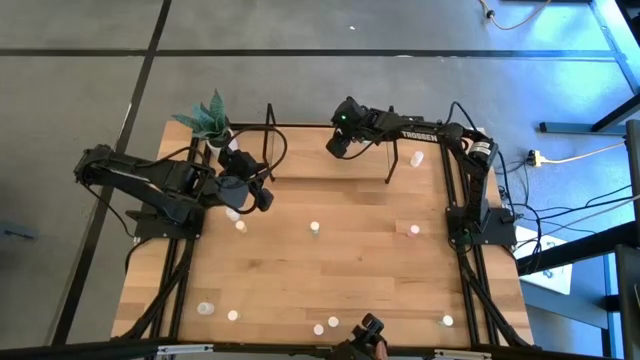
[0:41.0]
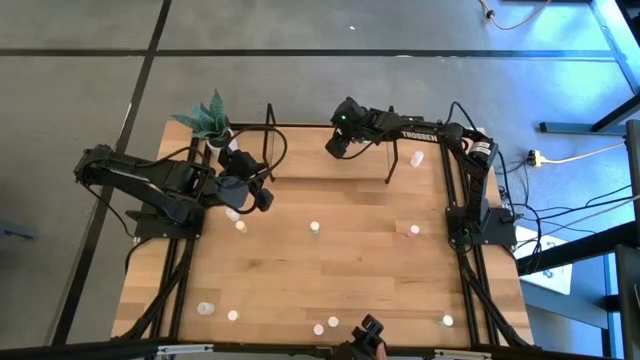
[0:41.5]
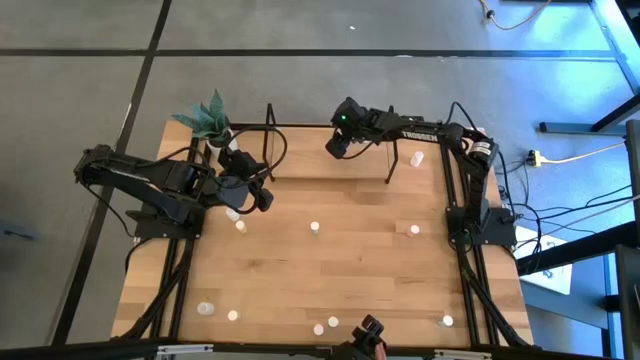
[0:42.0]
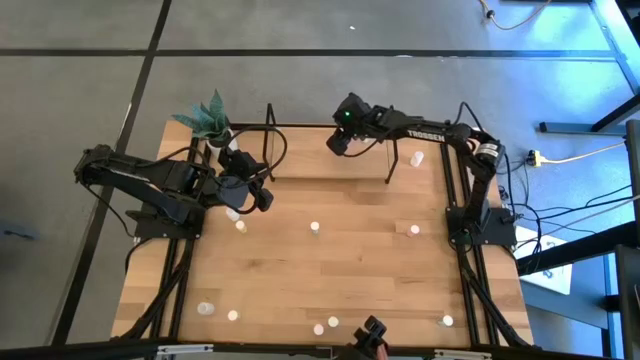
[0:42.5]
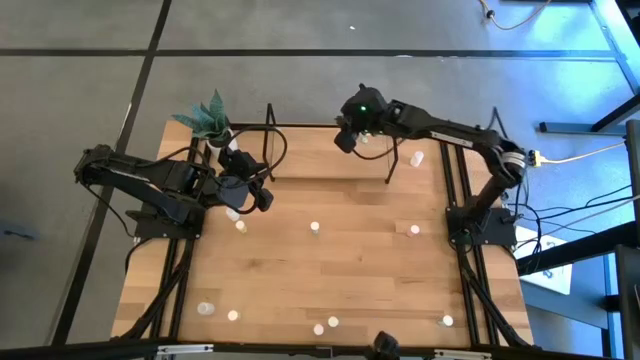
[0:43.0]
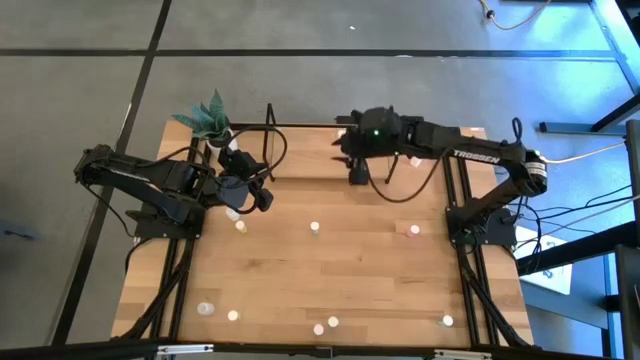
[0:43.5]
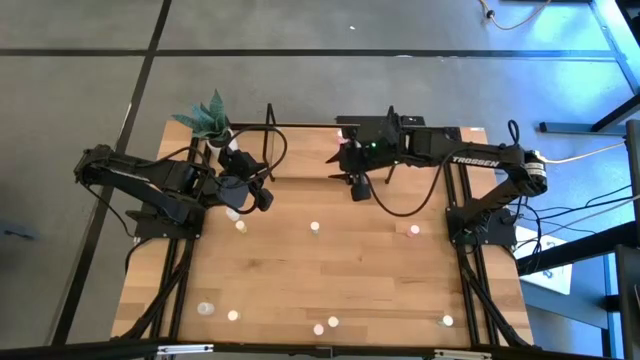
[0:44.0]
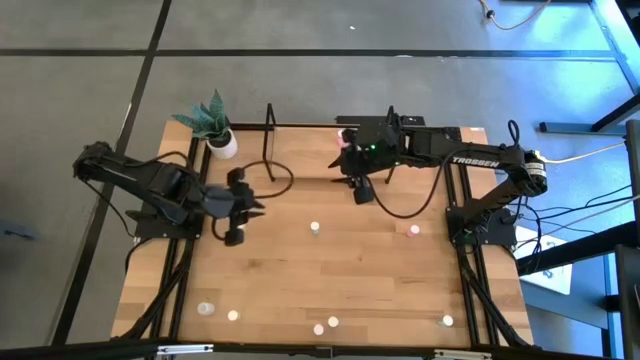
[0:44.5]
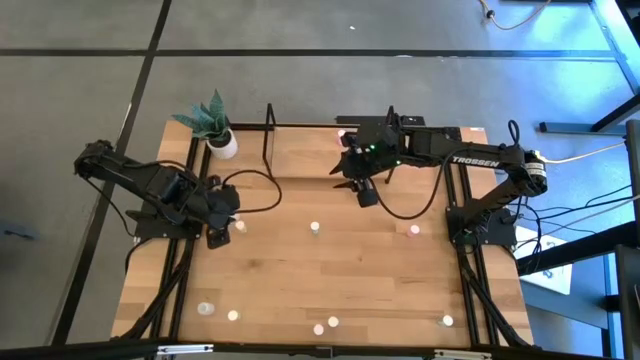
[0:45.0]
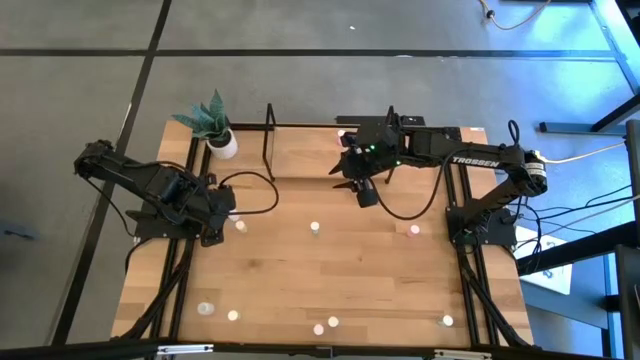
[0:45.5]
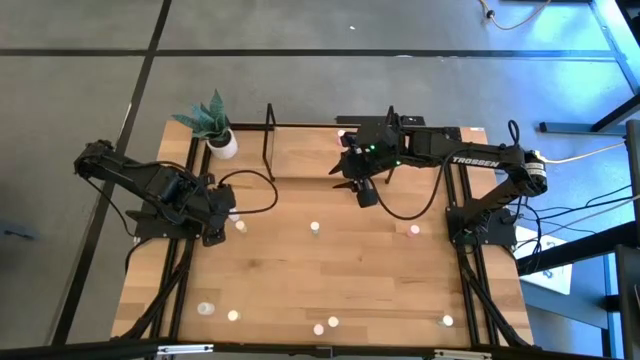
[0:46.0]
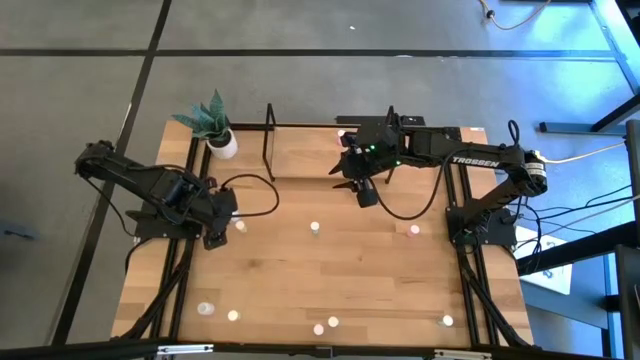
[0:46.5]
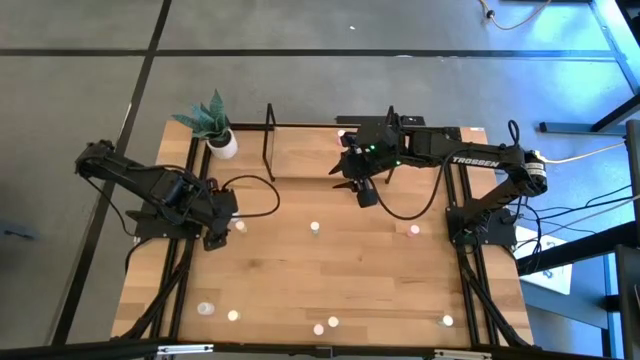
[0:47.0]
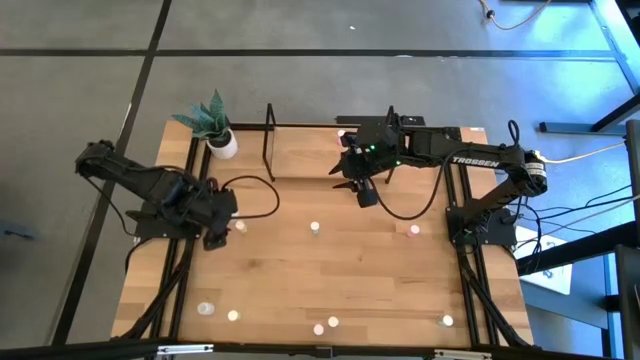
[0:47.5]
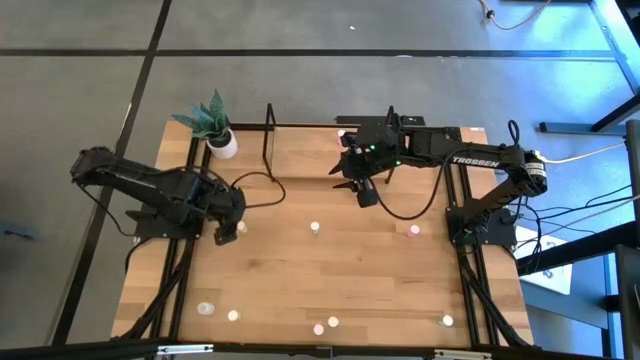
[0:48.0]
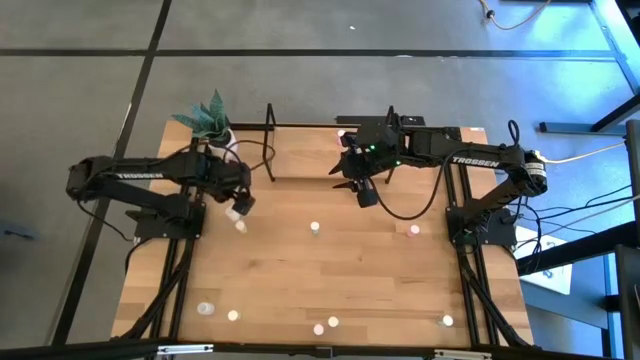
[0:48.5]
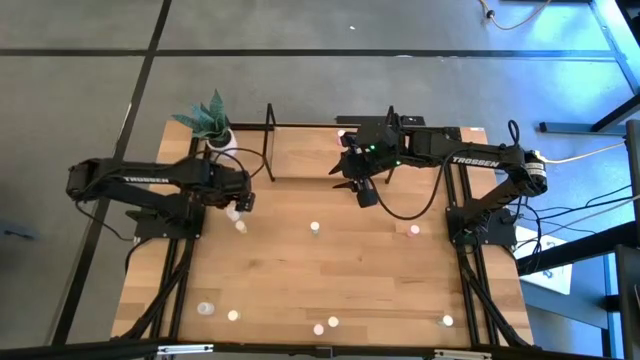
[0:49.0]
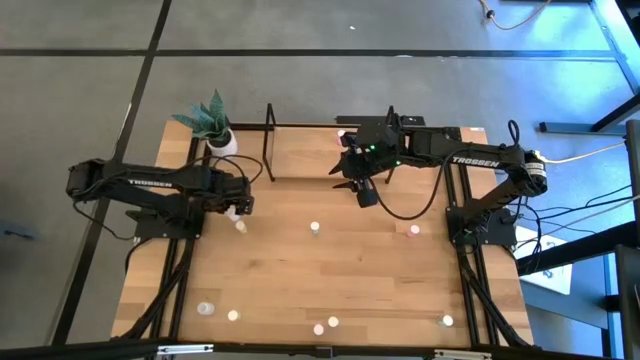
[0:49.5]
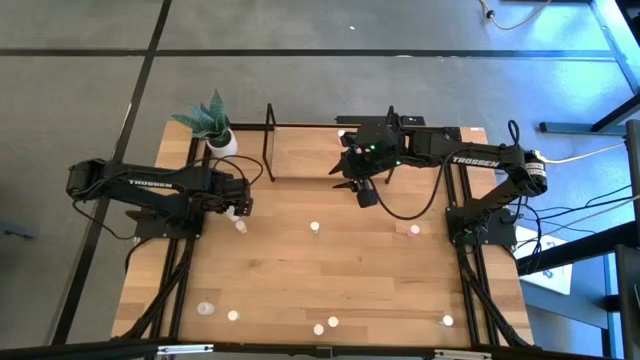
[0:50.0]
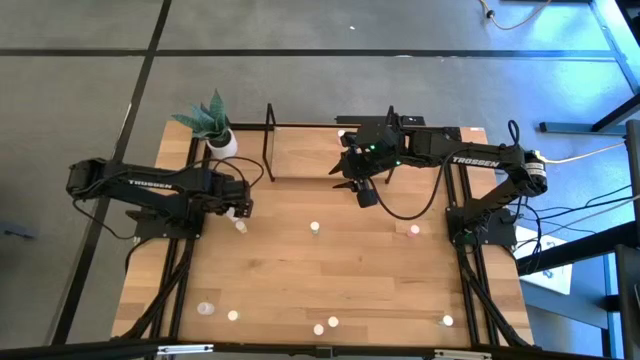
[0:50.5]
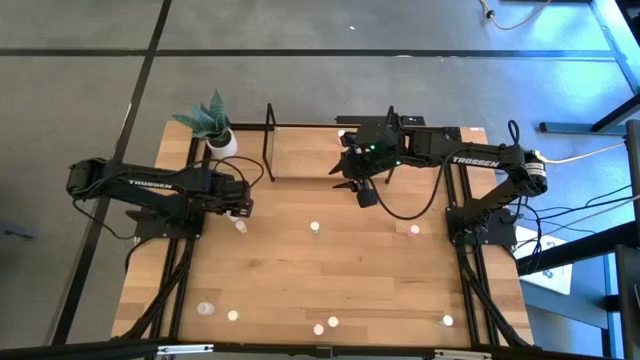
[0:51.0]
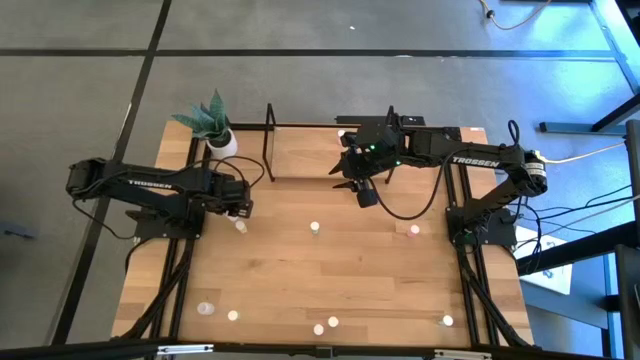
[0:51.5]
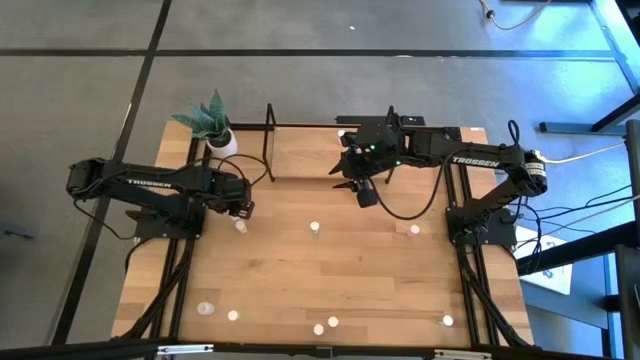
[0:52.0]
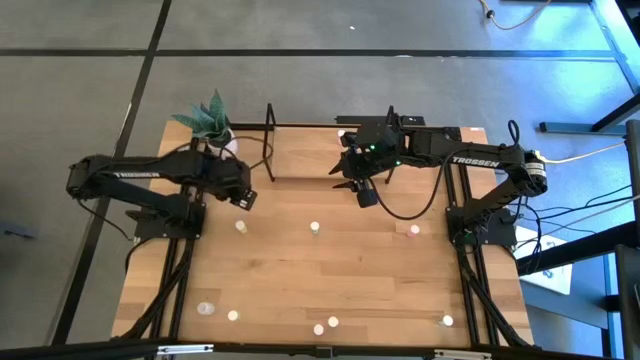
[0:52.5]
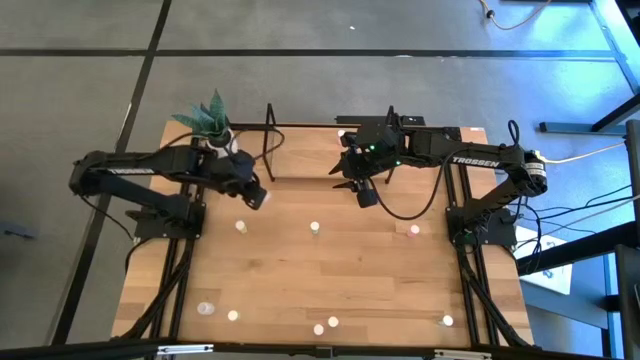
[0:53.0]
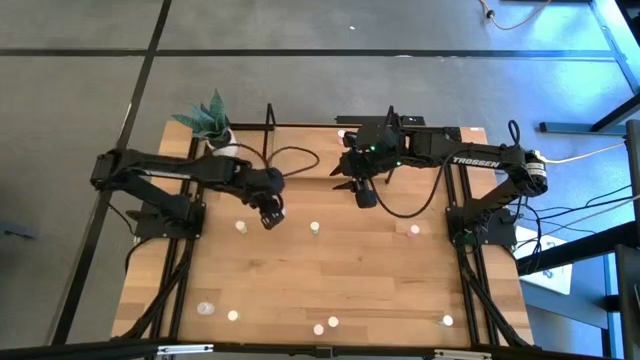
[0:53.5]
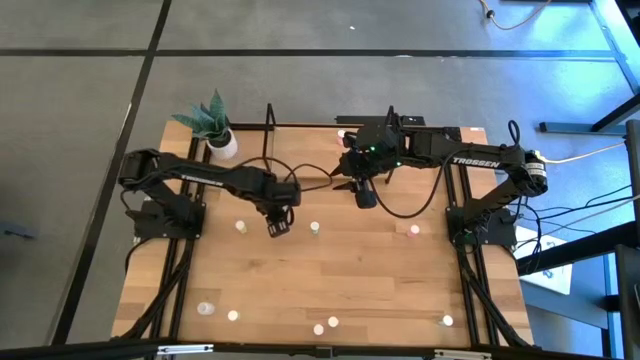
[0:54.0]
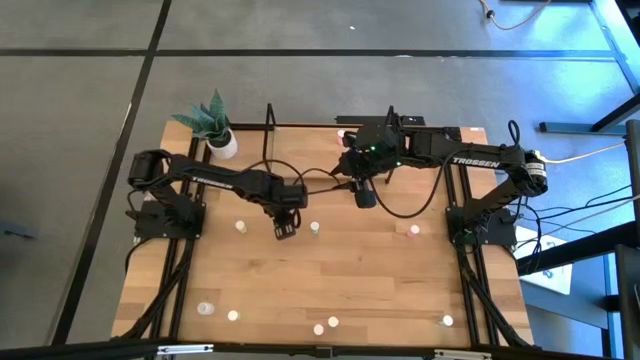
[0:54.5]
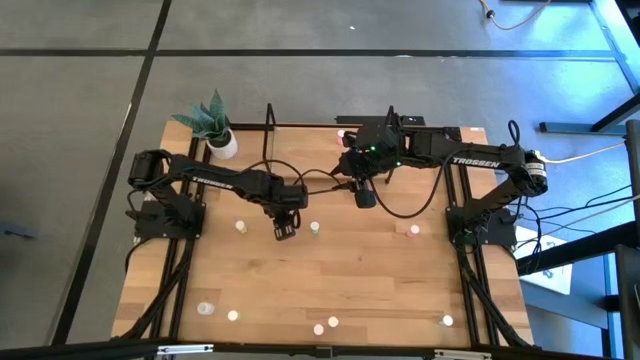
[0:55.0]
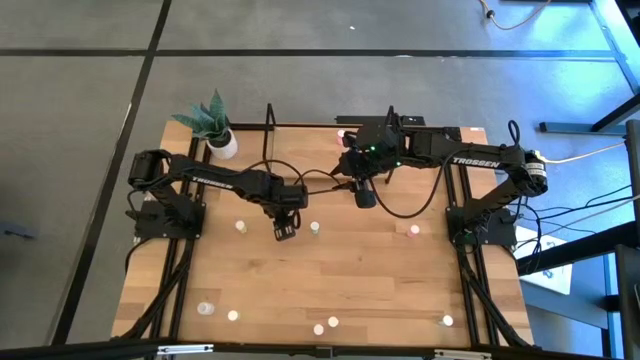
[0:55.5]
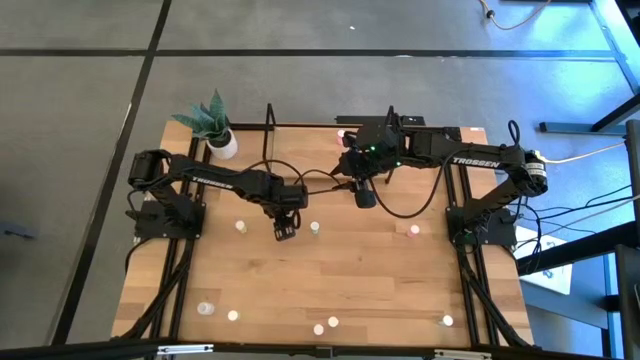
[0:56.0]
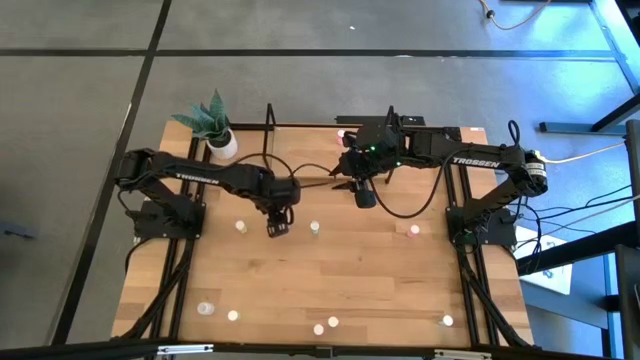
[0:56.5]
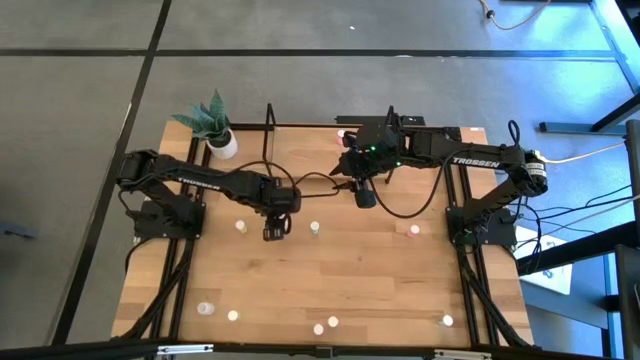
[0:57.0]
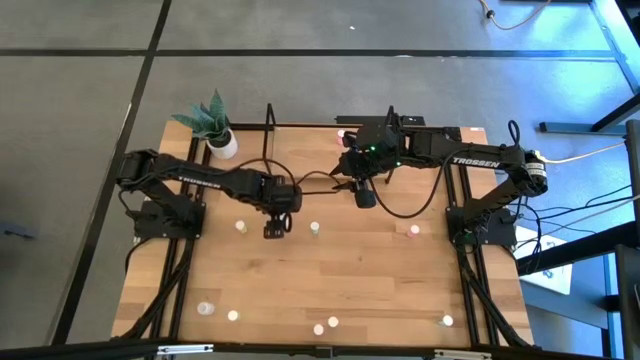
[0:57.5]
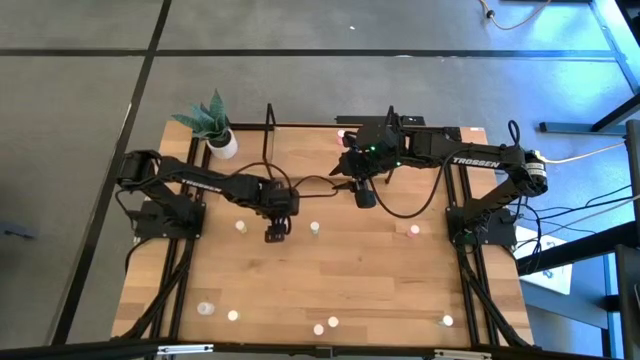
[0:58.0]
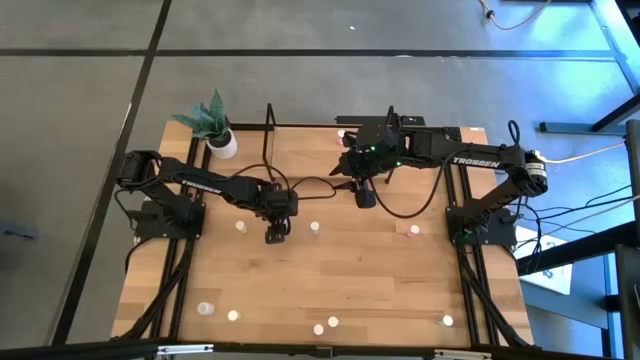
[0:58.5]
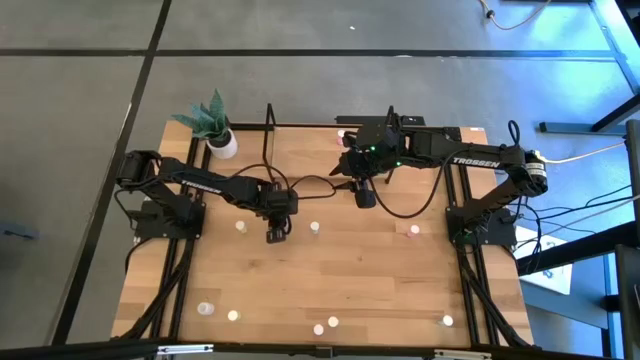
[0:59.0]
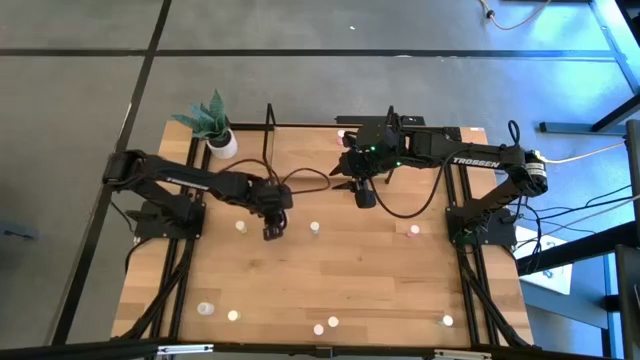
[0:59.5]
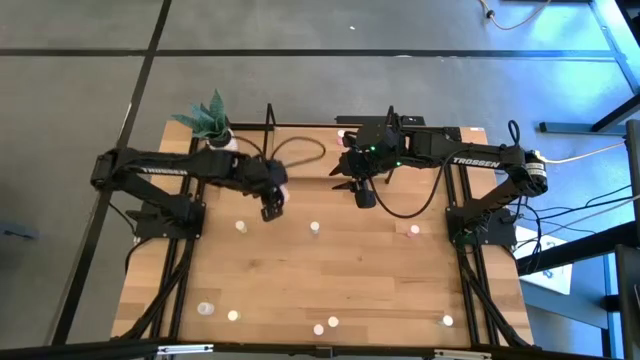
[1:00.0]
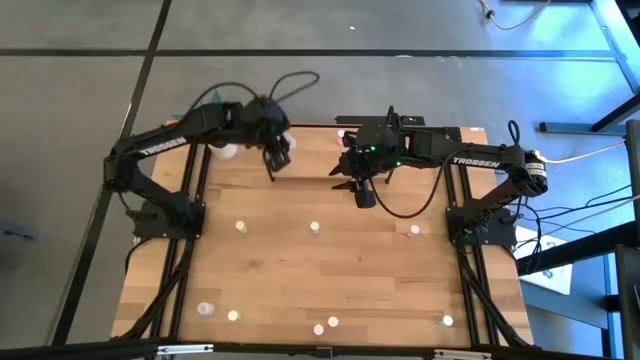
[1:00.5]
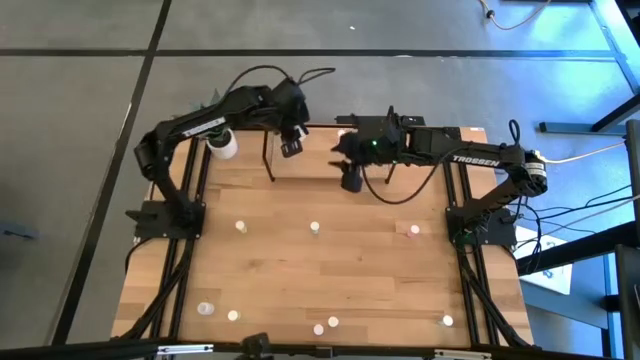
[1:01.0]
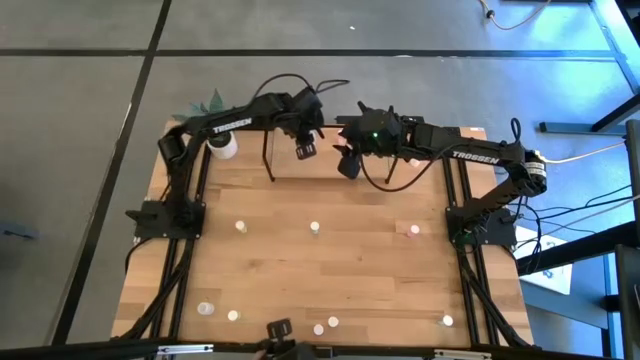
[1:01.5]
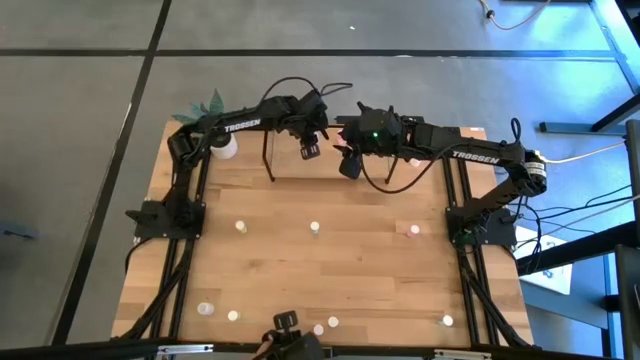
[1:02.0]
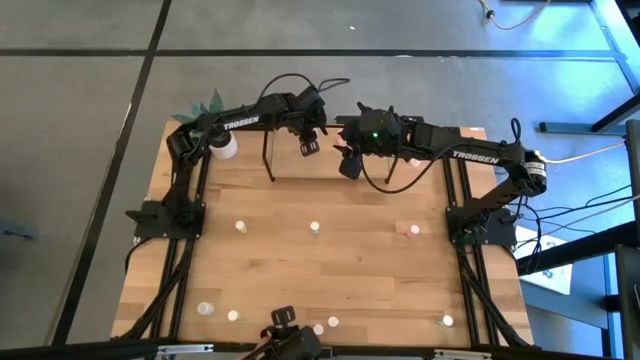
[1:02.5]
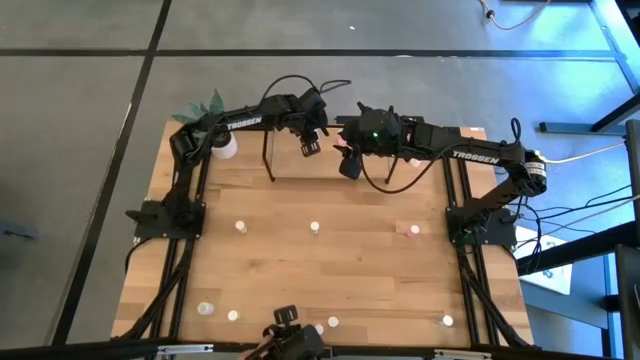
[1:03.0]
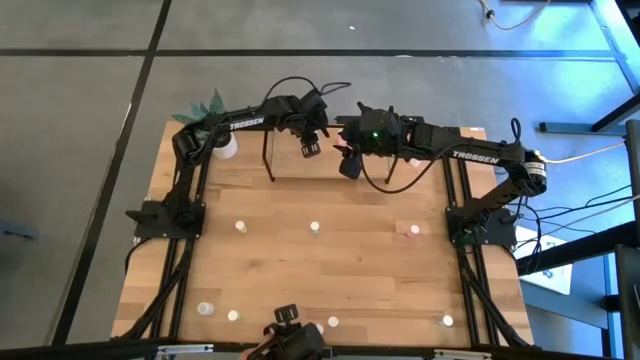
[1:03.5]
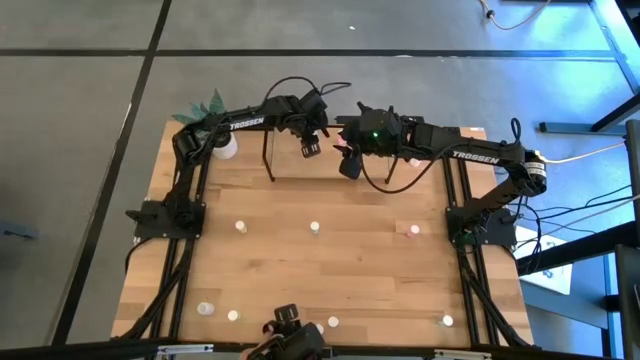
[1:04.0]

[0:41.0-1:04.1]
Task: Pick and place medicine bottles onto shelf by color
Put the center white pill bottle on the shelf
